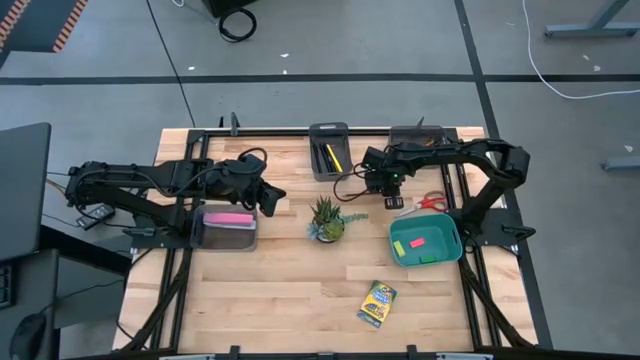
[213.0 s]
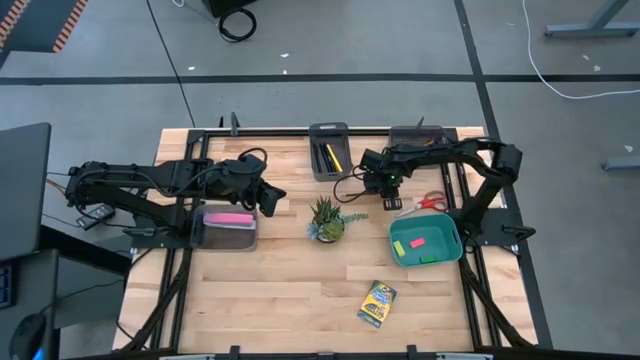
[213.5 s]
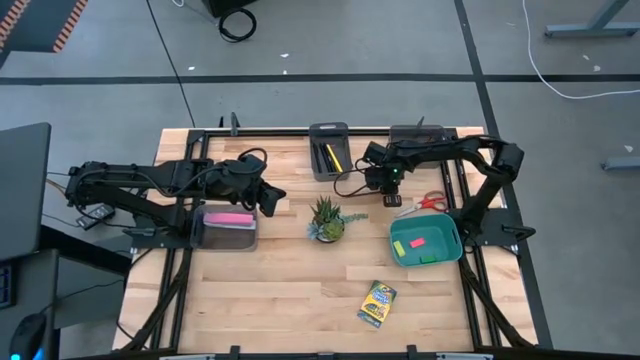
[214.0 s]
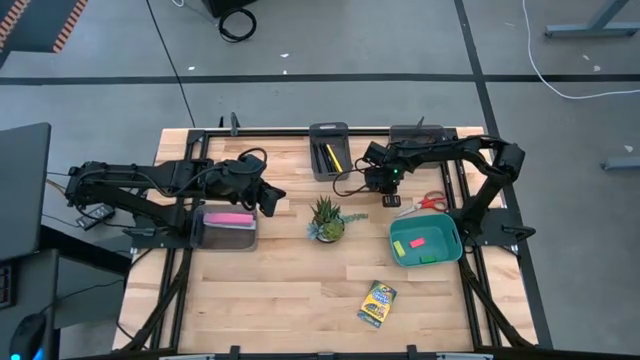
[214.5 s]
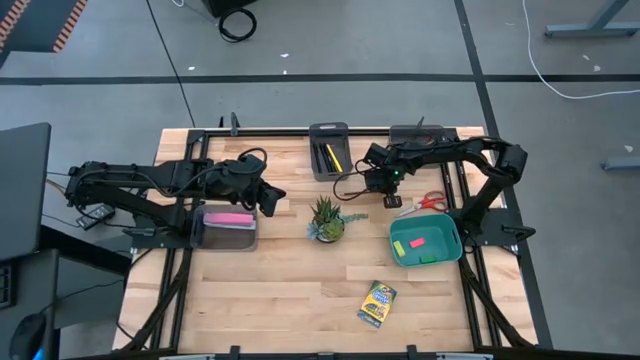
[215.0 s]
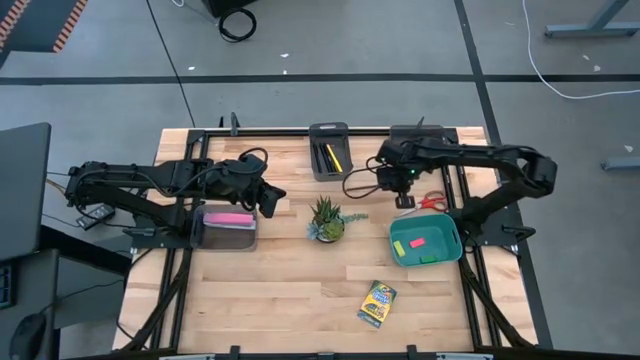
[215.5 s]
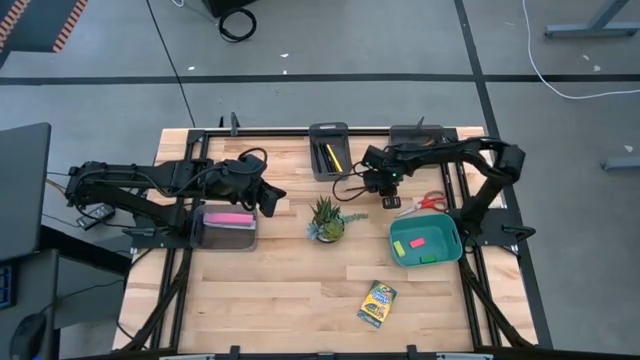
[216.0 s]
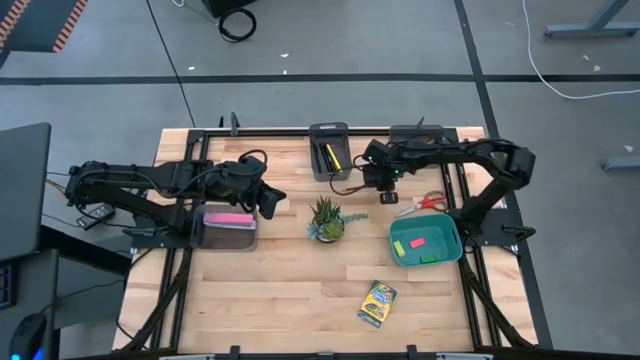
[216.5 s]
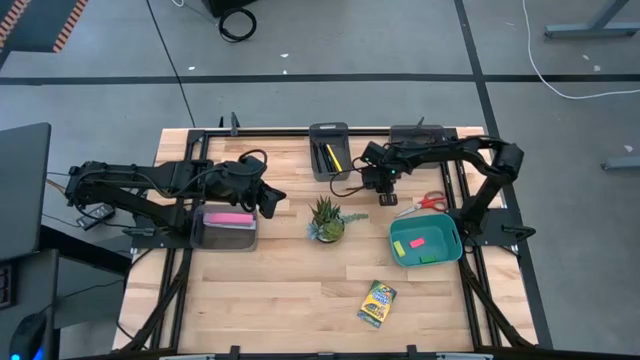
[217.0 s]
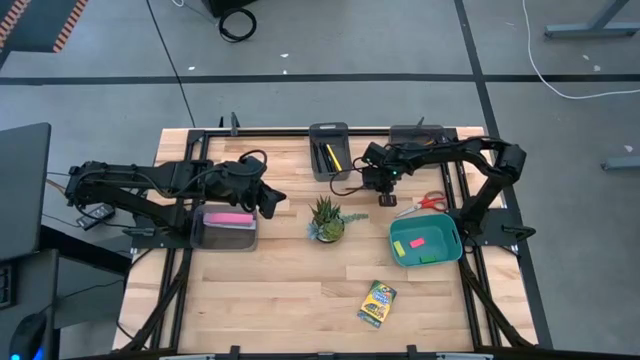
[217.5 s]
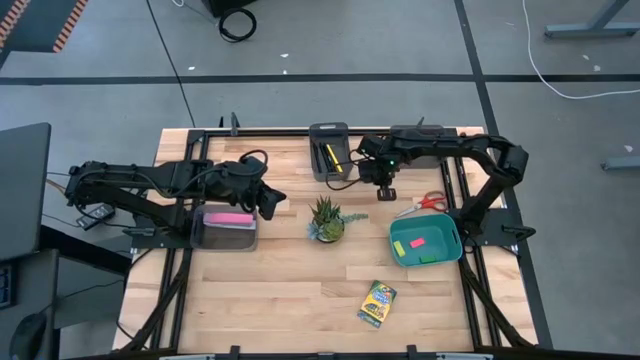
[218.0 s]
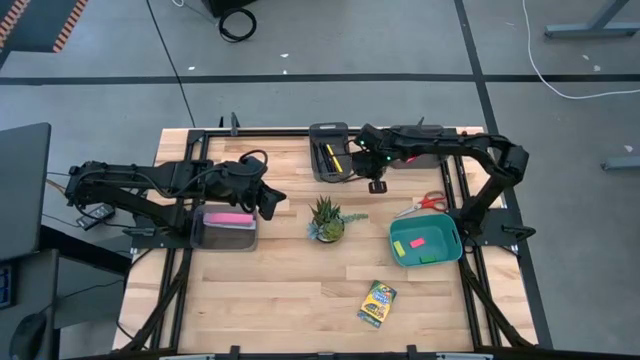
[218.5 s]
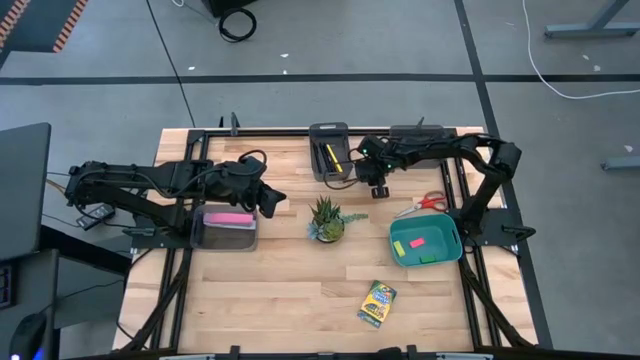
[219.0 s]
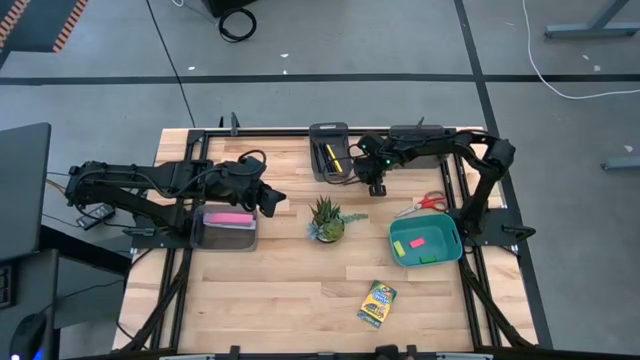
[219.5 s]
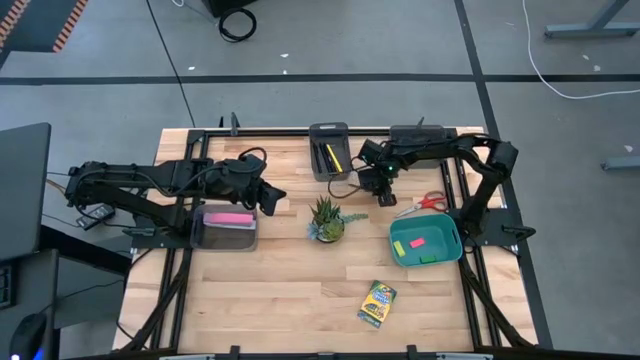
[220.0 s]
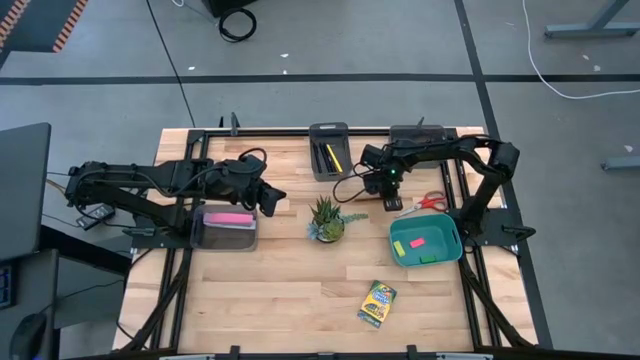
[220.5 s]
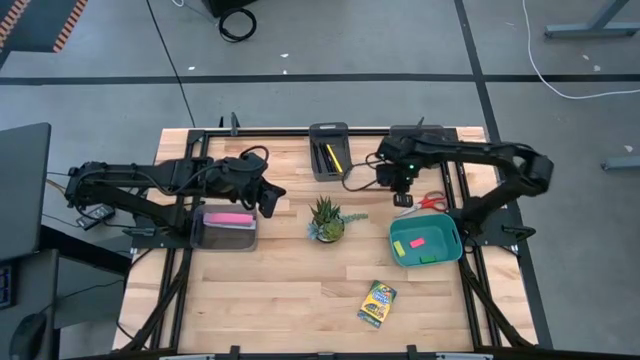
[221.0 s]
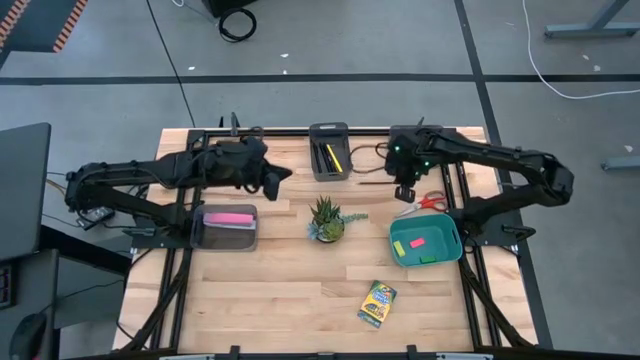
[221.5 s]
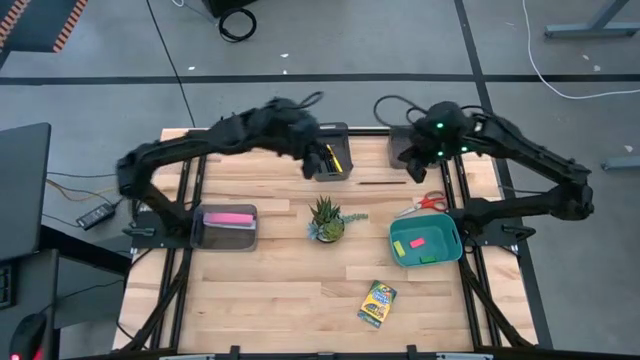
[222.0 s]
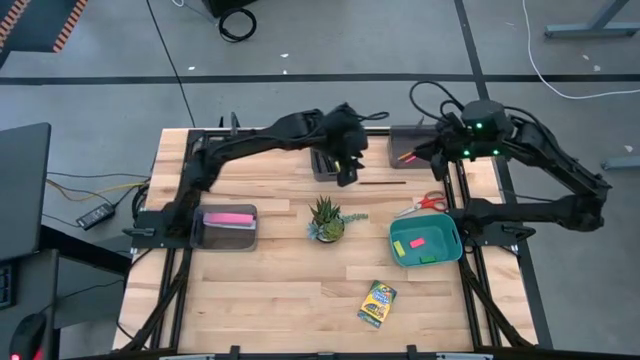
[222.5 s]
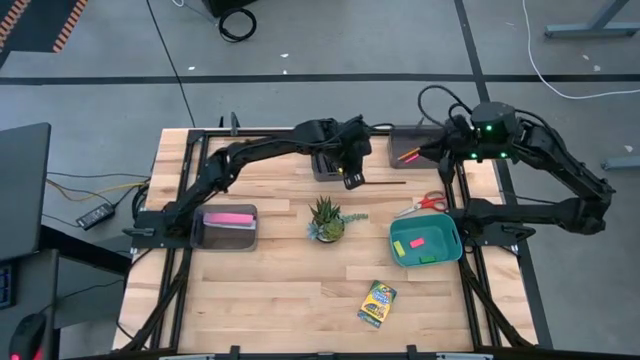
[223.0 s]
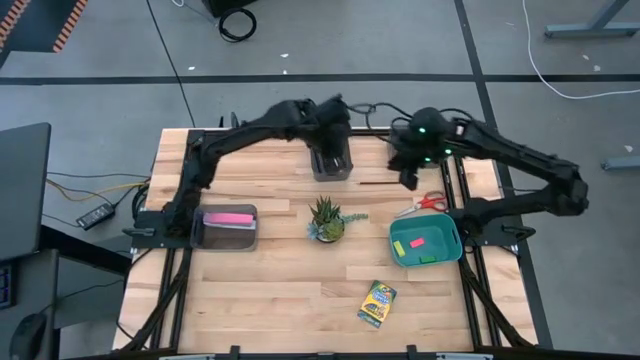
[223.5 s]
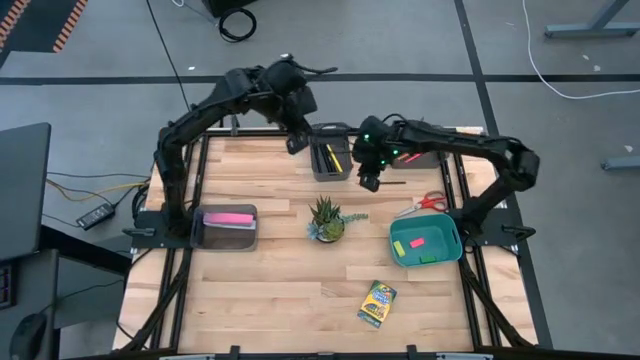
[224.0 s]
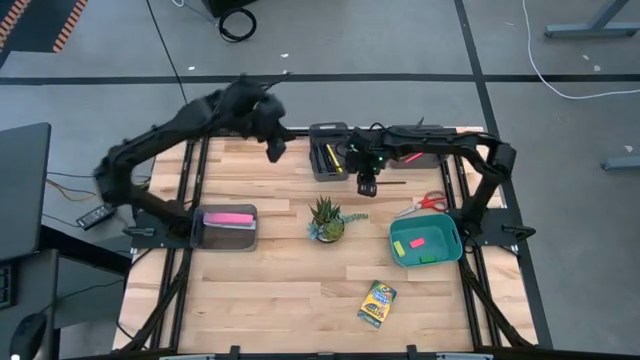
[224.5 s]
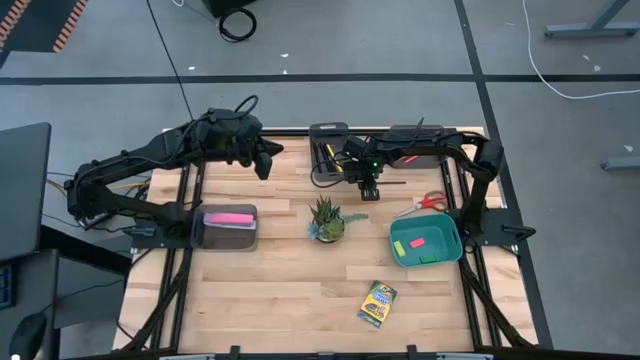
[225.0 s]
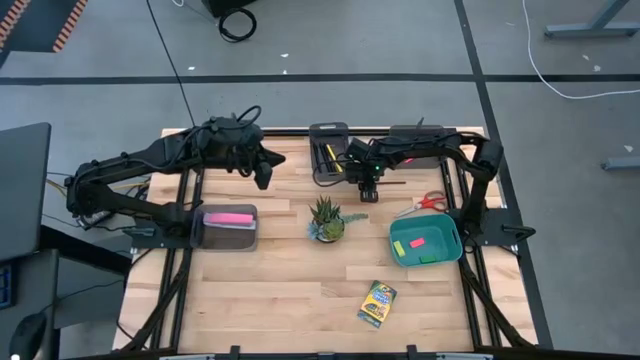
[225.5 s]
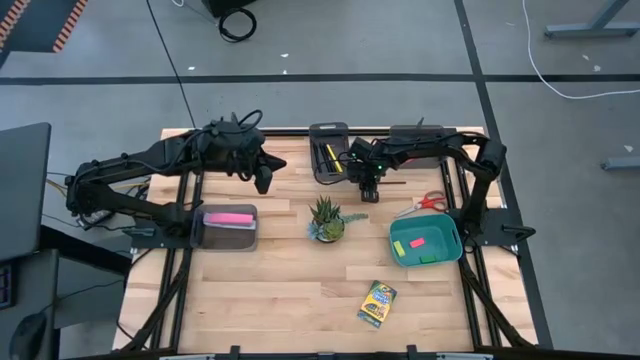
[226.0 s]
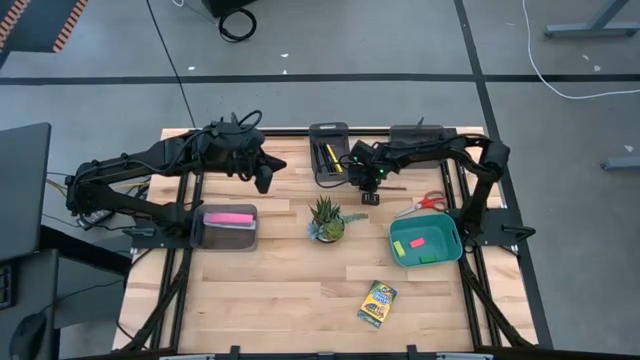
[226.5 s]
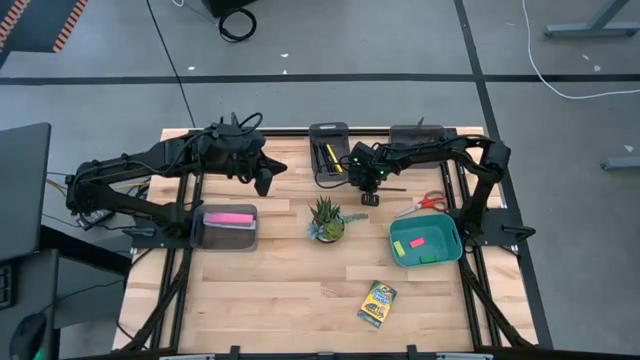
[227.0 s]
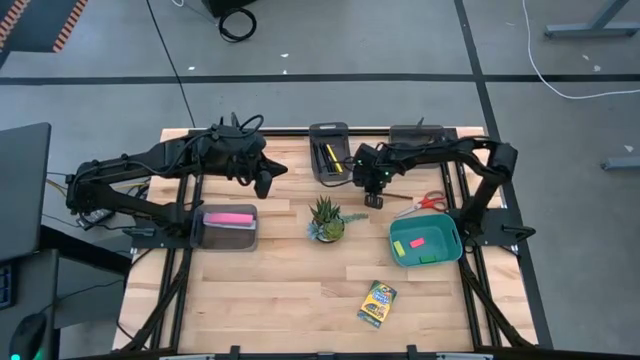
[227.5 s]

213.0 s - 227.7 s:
Task: Sort crayons/erasers/pens/pencils in bins
Put the brown pencil into the right black bin

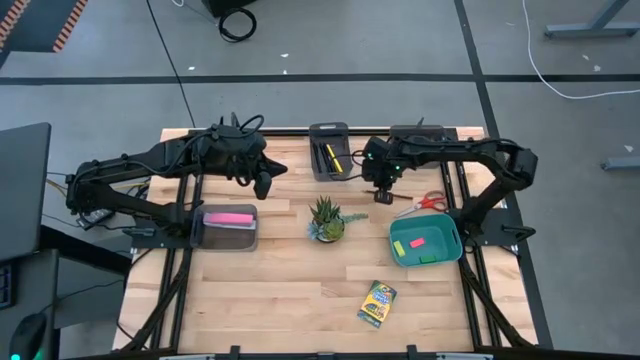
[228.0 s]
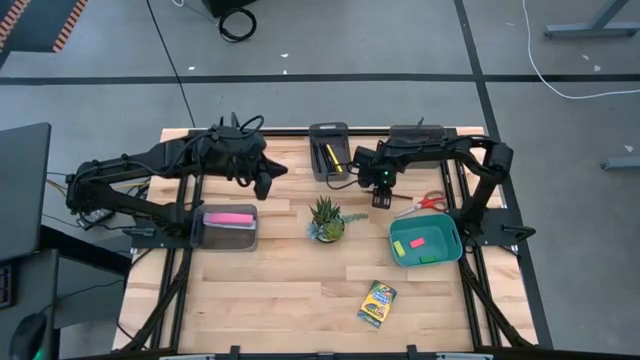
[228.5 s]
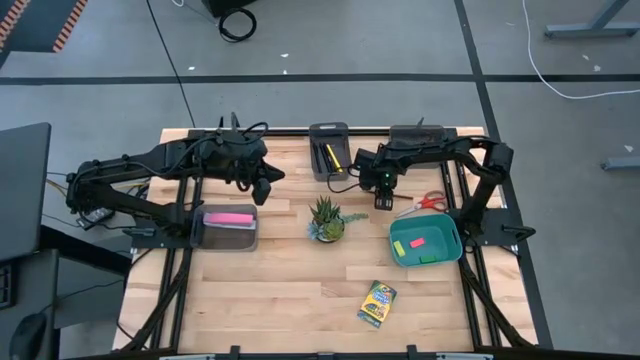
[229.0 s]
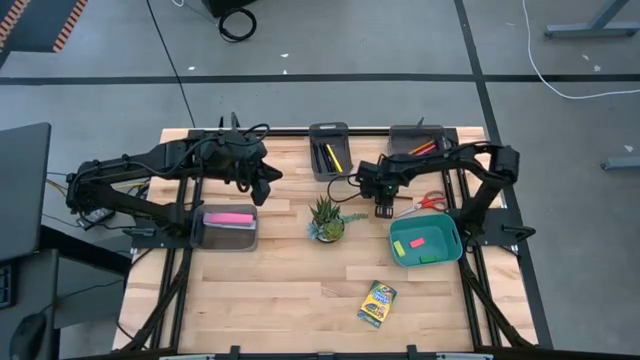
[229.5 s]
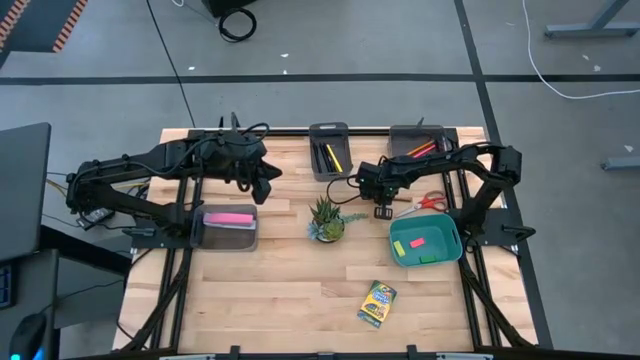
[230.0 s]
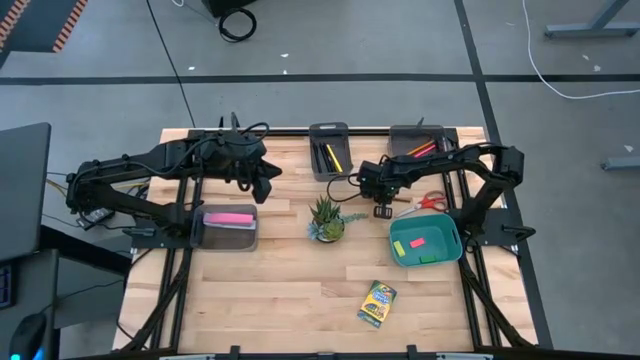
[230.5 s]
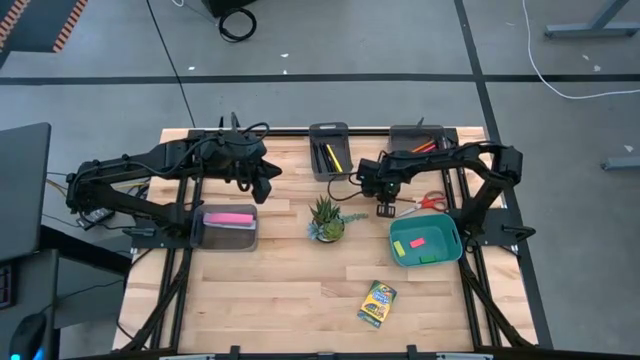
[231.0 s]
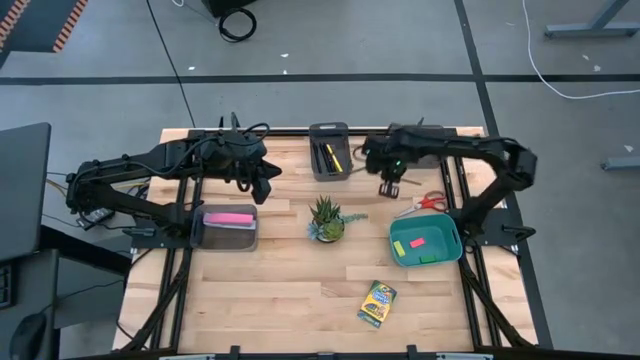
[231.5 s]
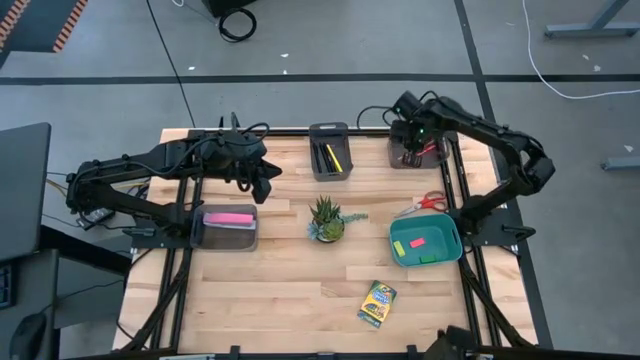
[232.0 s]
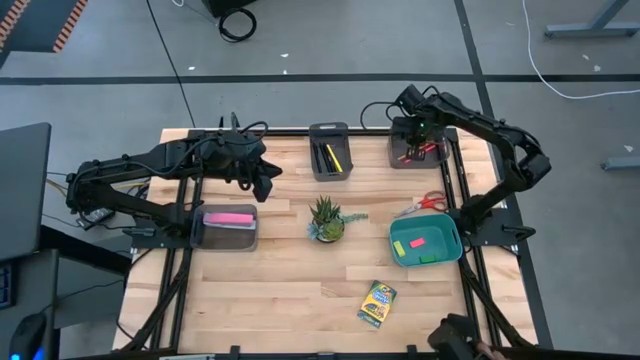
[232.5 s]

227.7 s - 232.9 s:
Put the red pencil into the right black bin

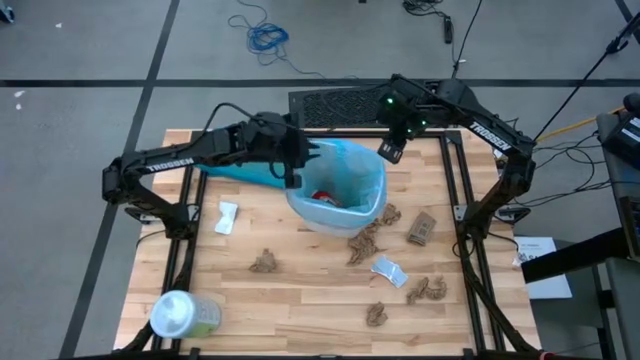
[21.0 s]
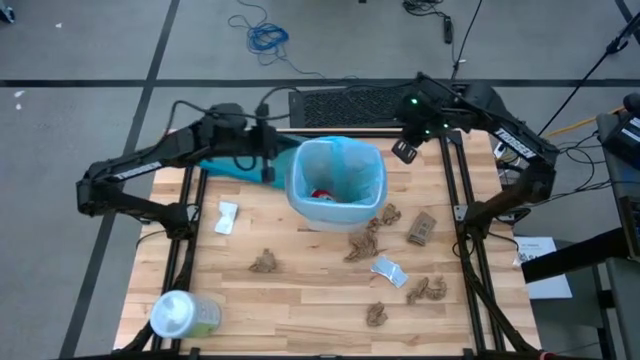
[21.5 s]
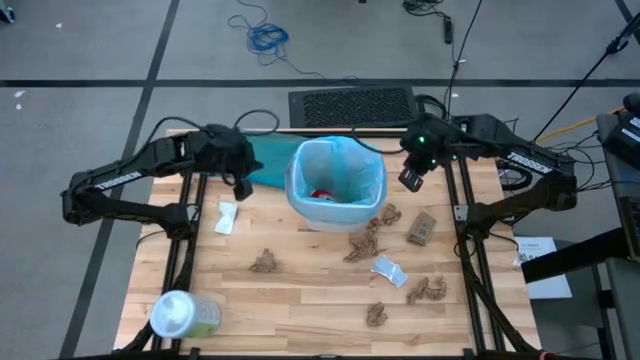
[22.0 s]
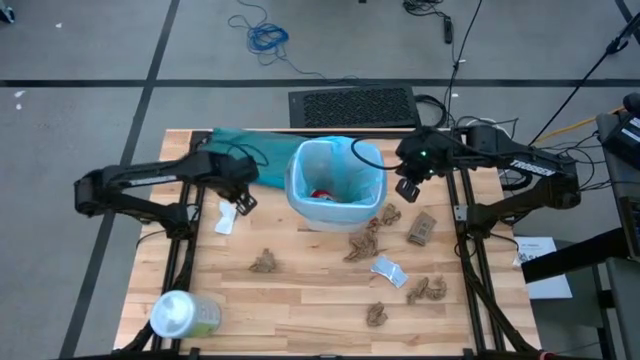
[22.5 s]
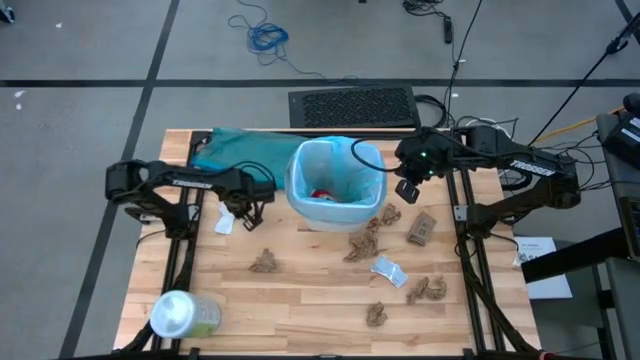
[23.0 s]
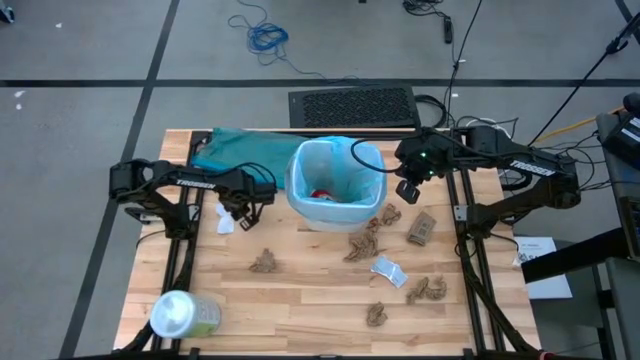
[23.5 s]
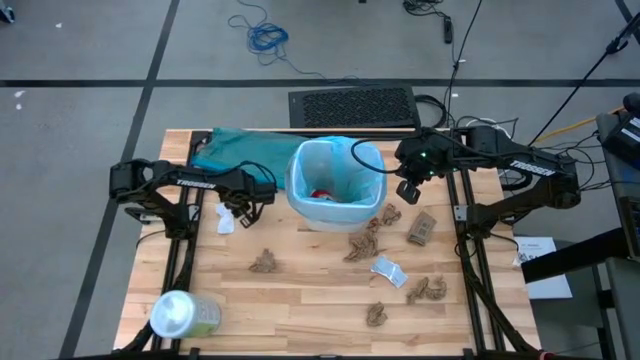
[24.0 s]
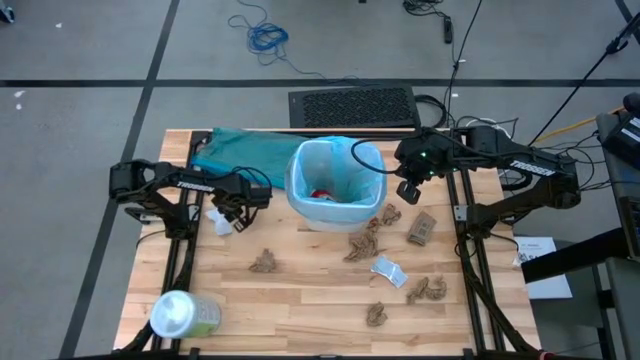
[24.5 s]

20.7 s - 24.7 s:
Task: place trash/remove bag and relplace
Put the white paper into the trash bin
